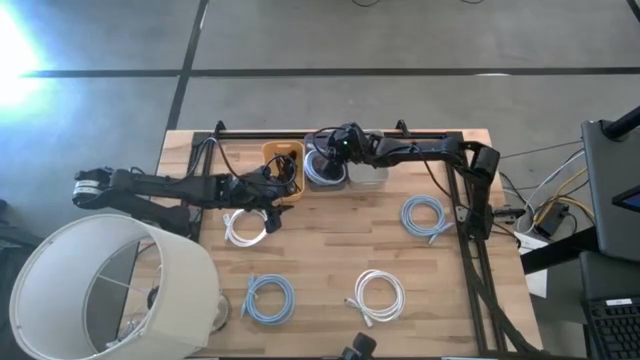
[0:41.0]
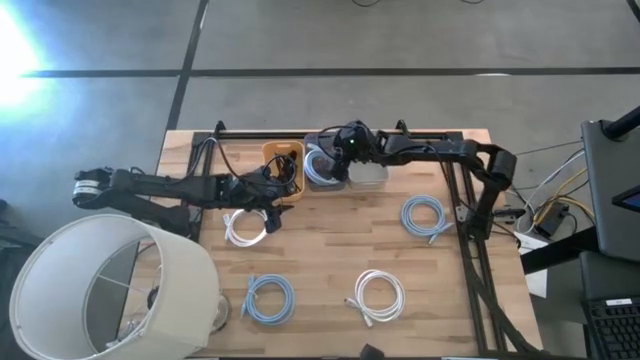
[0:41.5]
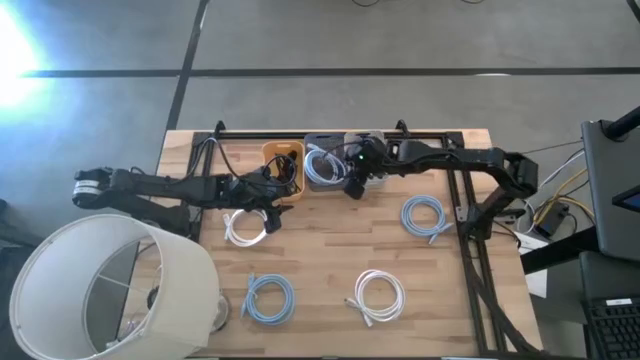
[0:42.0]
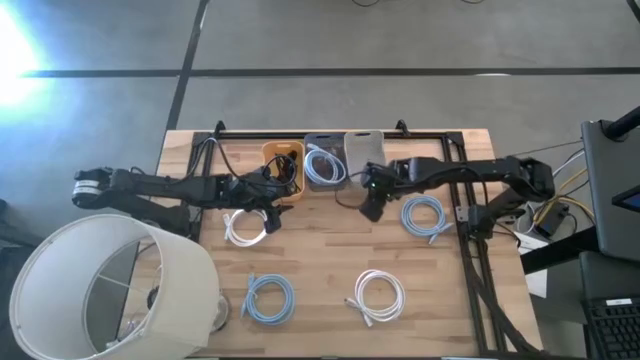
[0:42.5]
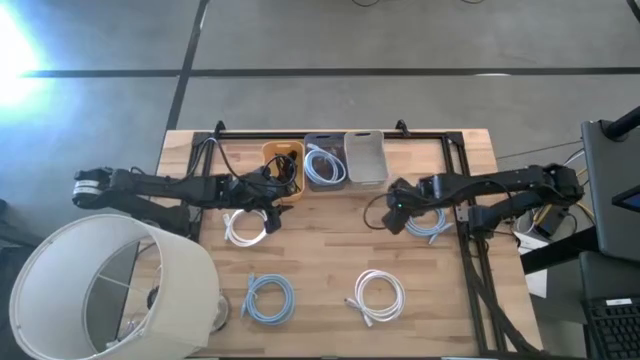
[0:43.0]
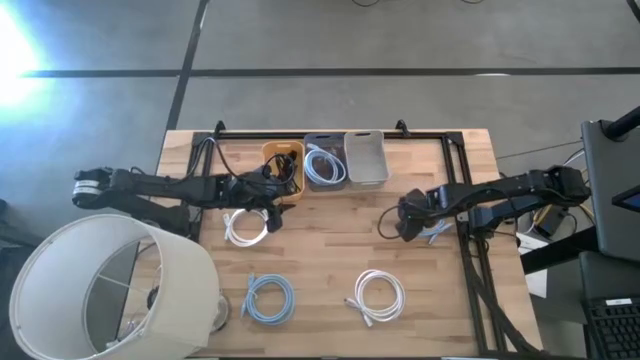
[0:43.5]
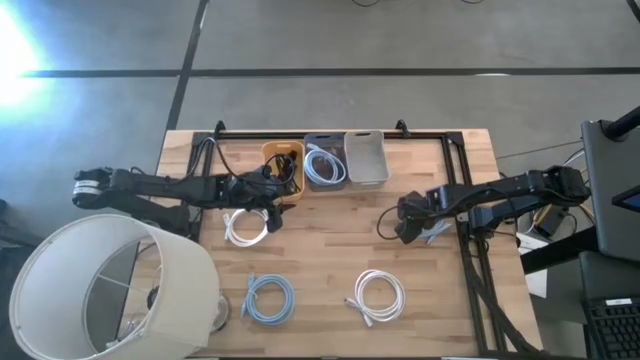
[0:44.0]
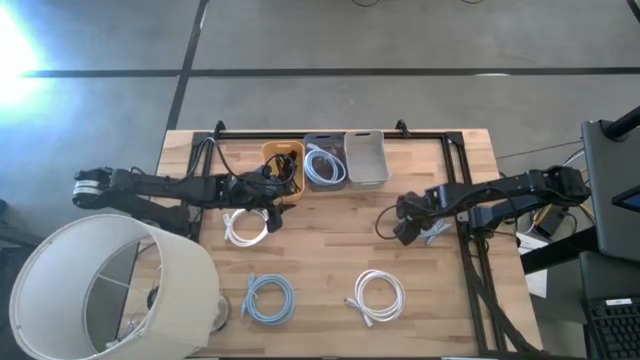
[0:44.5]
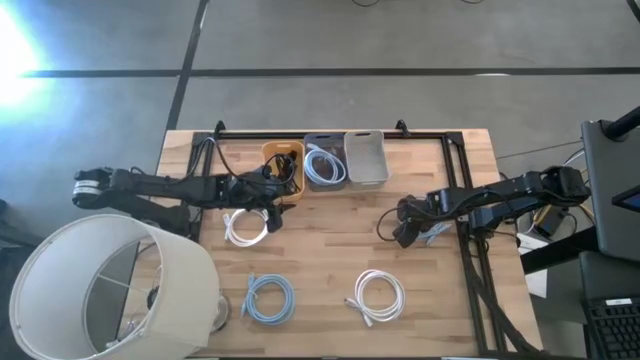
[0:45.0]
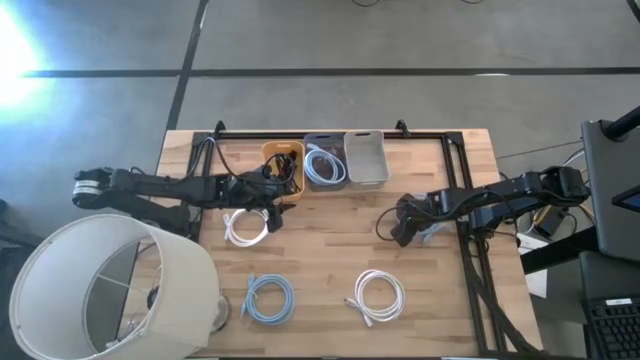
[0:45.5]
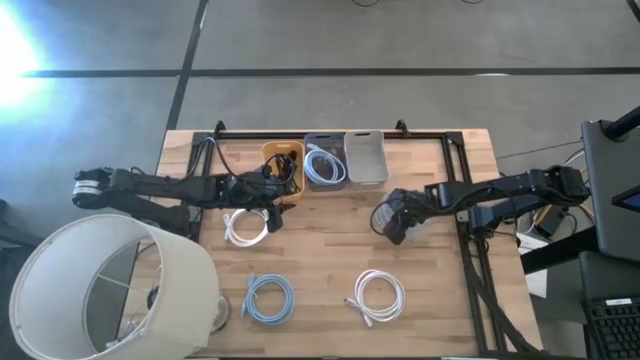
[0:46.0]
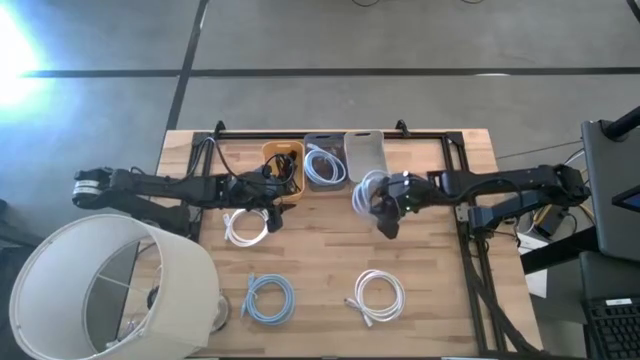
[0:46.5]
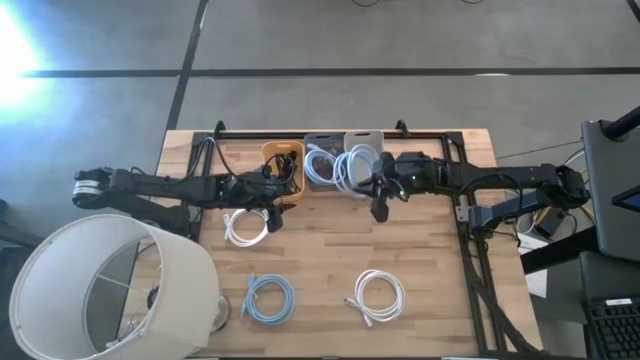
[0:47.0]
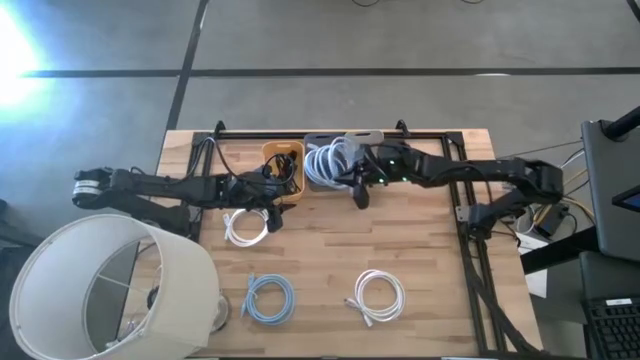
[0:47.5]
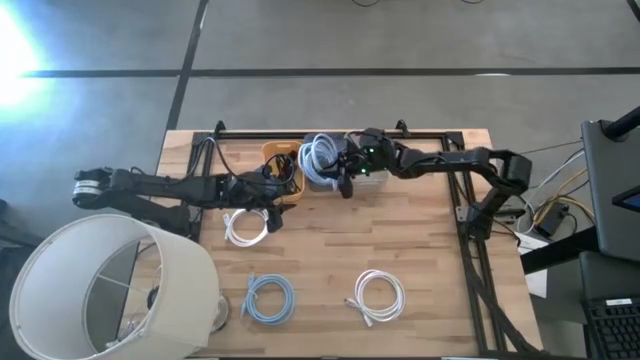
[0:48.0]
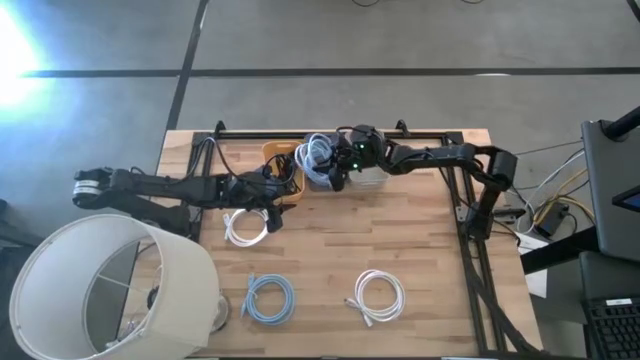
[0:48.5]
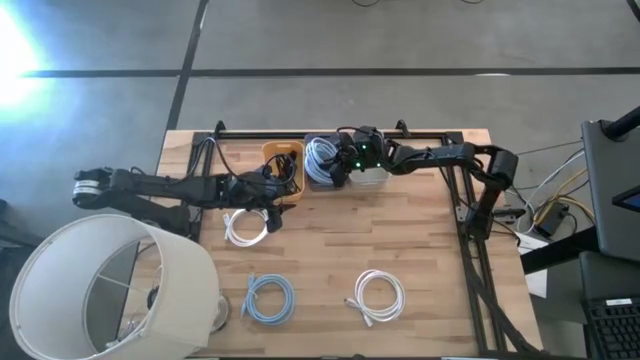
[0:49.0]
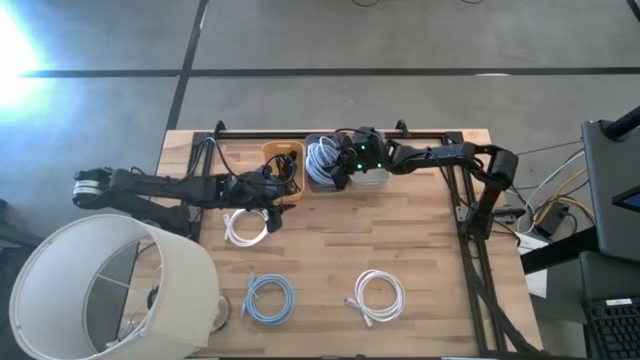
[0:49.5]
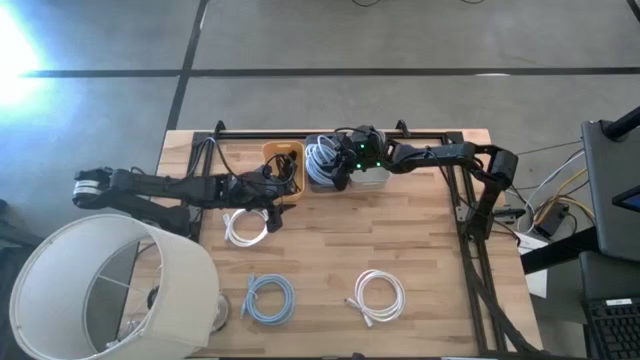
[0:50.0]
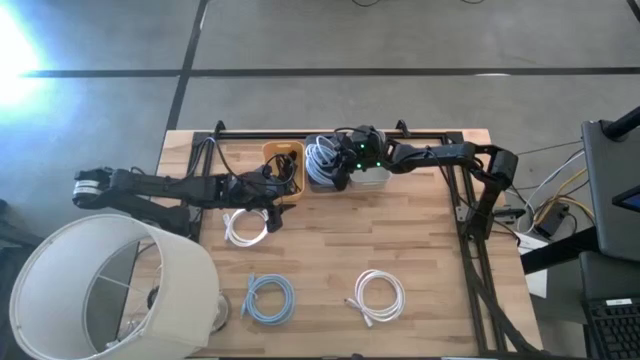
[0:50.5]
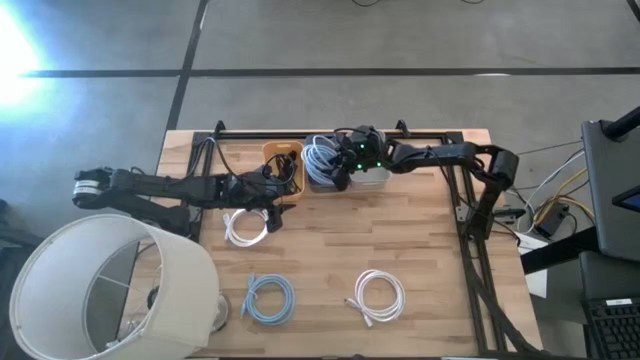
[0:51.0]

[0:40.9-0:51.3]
Task: Pick & Place USB Port
Put the top blue hdmi cable into the black bin

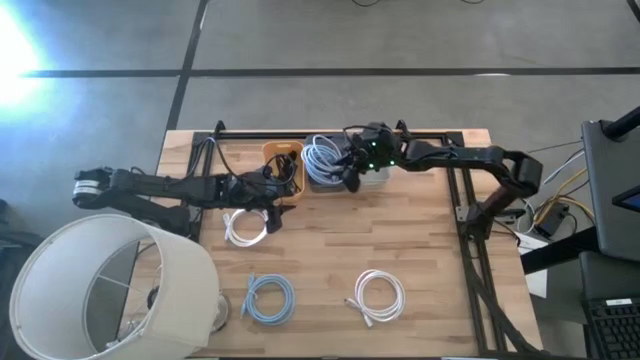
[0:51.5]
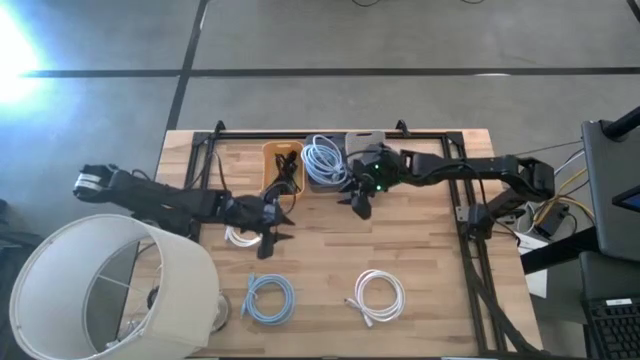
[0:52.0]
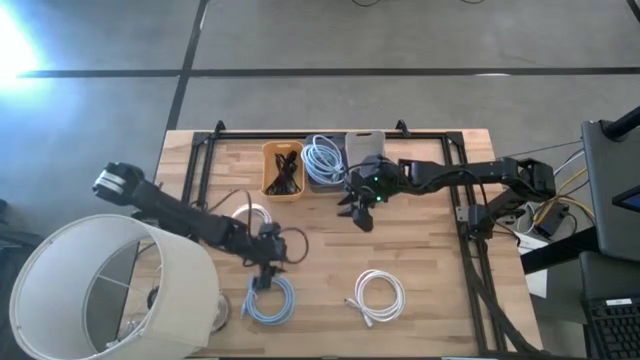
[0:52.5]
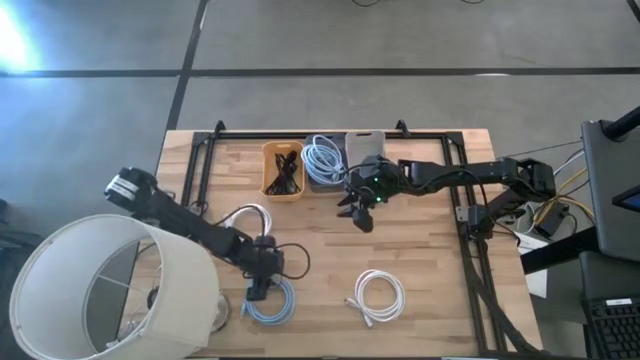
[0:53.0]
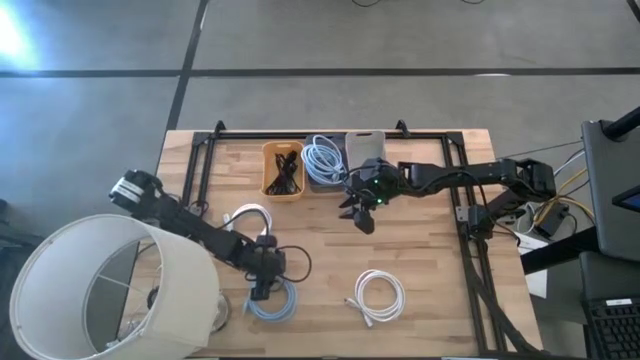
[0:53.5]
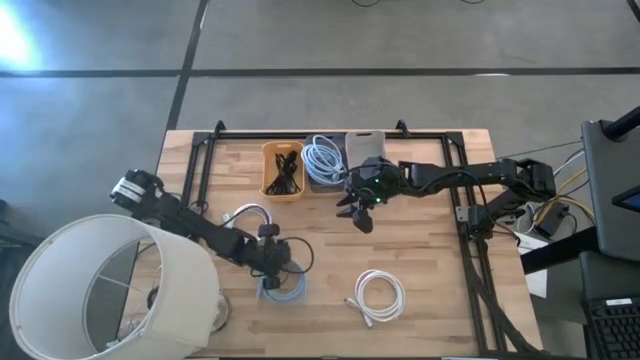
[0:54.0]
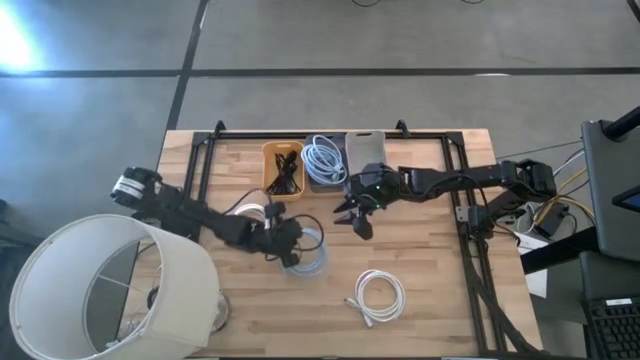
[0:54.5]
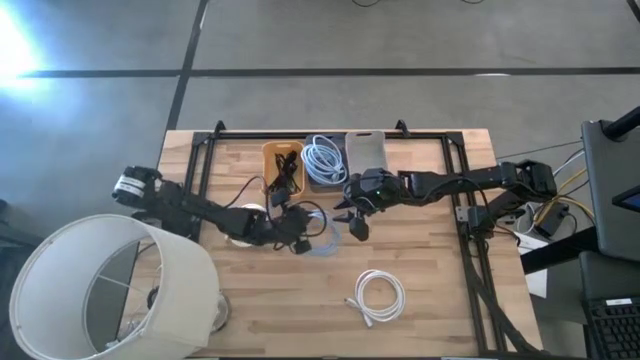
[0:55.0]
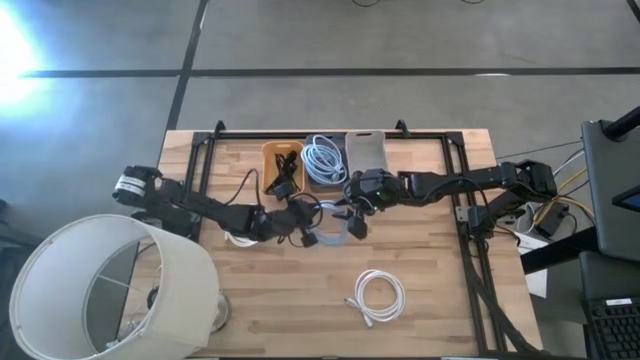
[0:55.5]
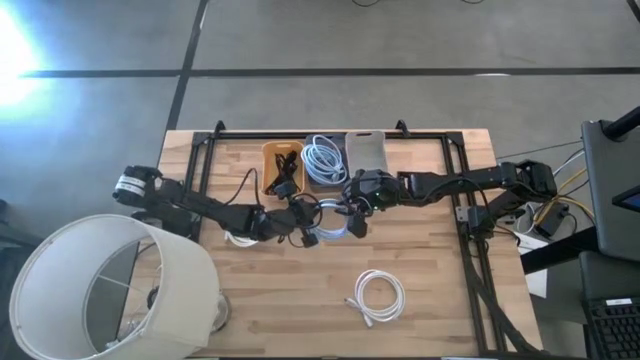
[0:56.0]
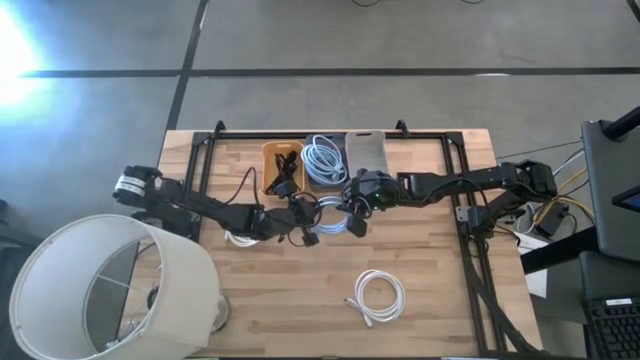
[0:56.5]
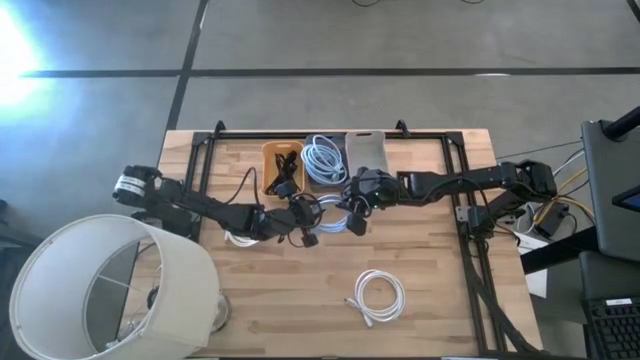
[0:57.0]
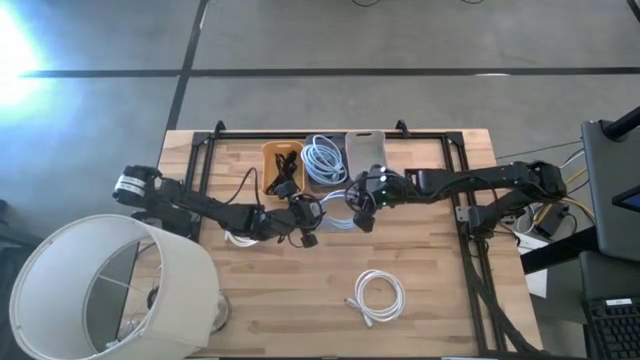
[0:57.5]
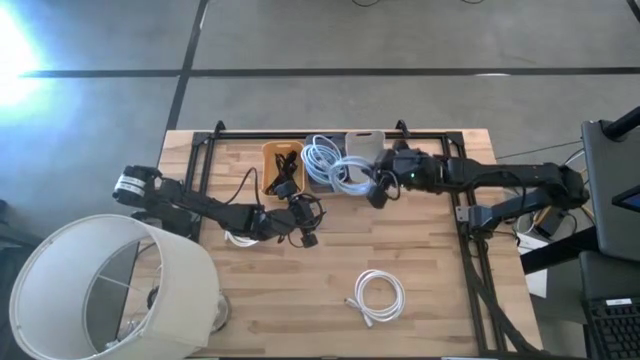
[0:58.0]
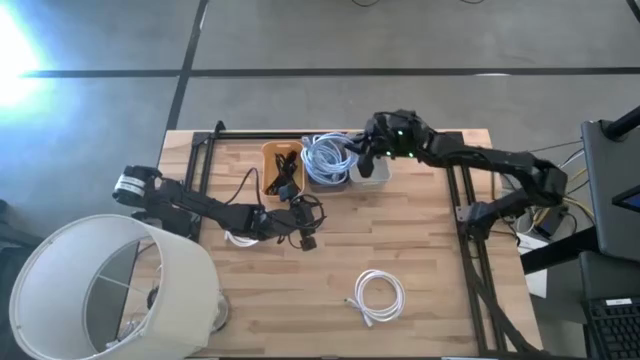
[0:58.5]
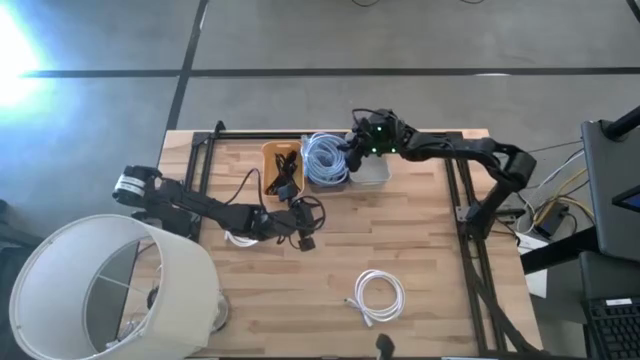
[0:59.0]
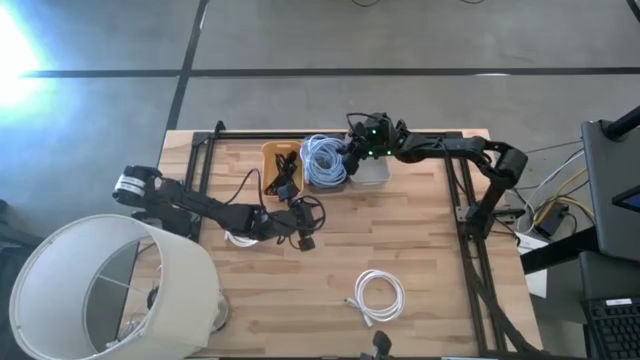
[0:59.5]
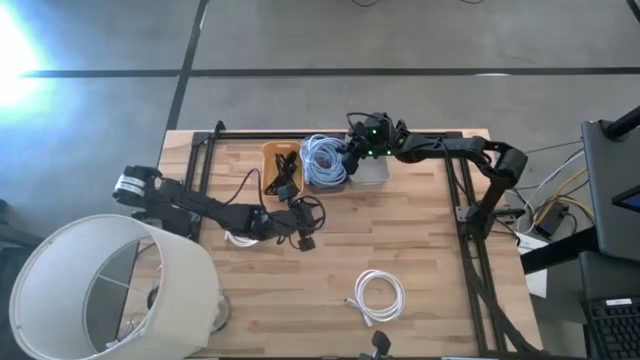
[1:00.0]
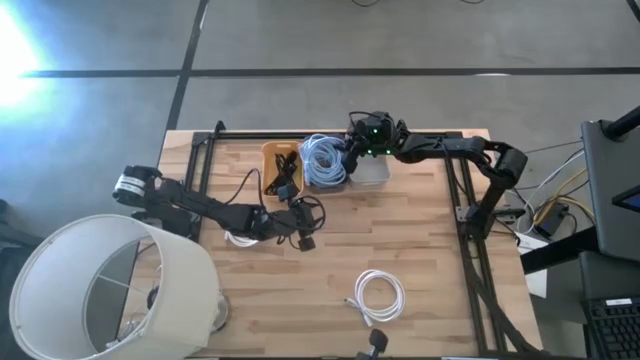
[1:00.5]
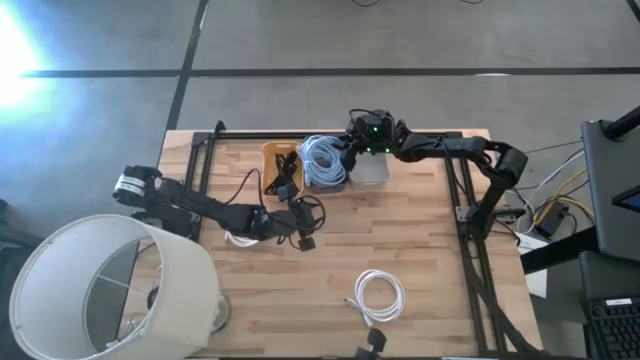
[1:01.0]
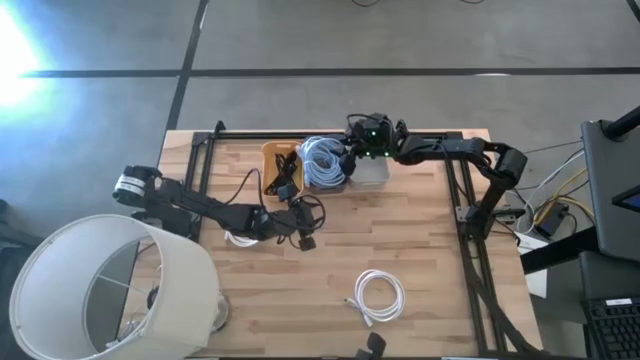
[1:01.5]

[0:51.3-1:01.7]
Put the blue hdmi cable into the black bin
